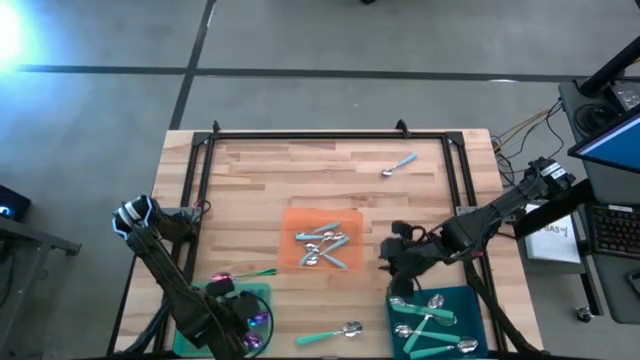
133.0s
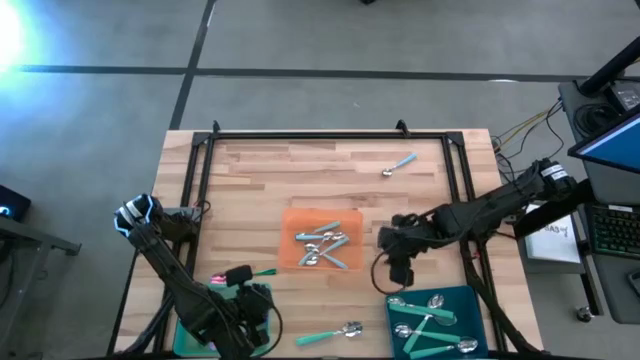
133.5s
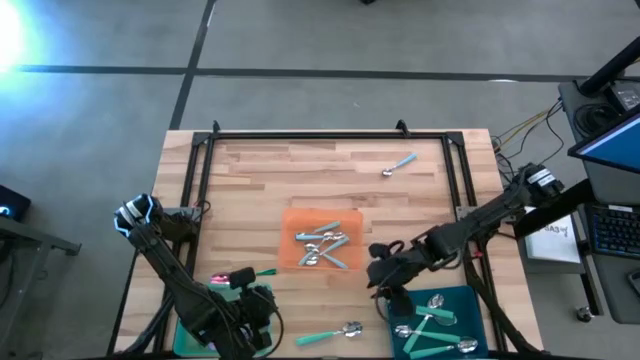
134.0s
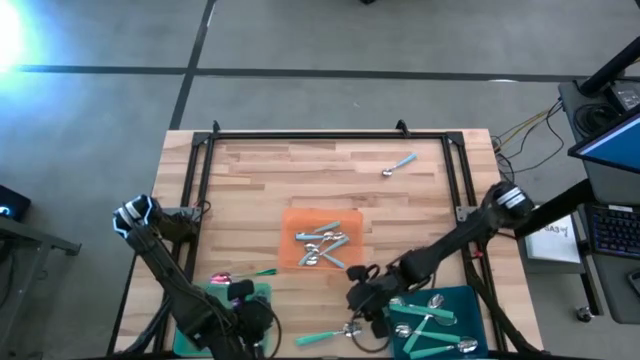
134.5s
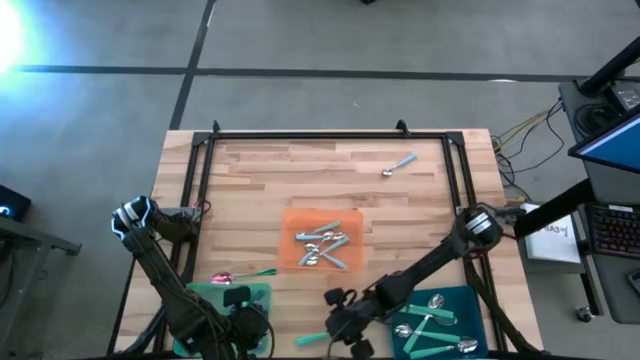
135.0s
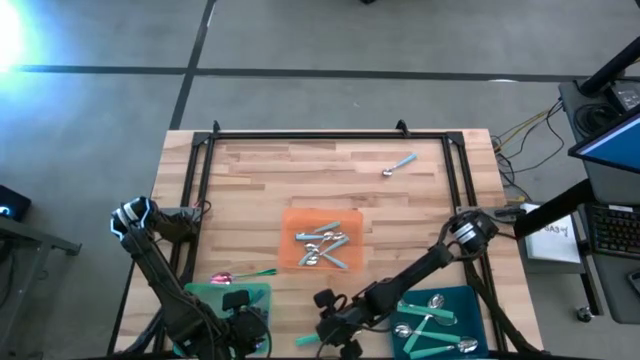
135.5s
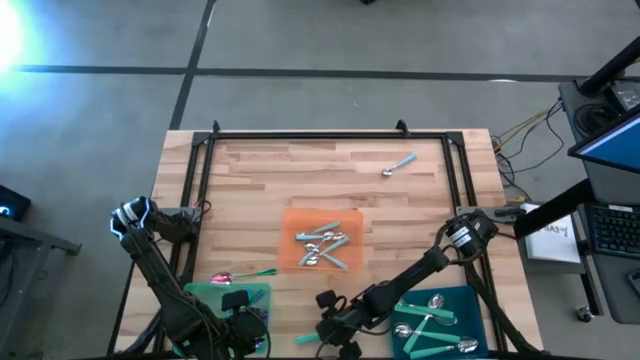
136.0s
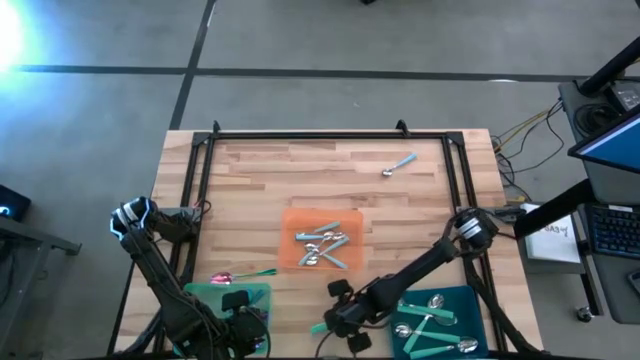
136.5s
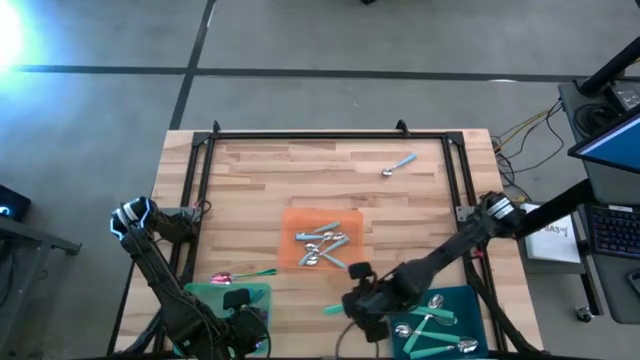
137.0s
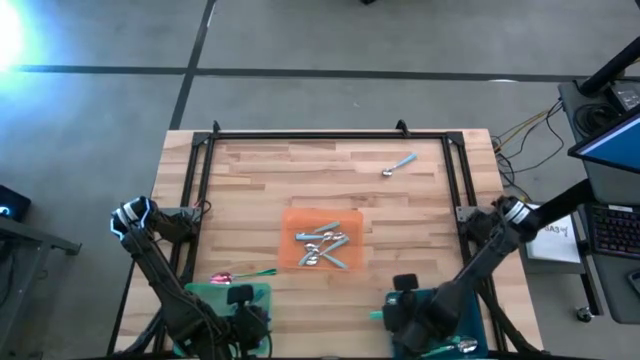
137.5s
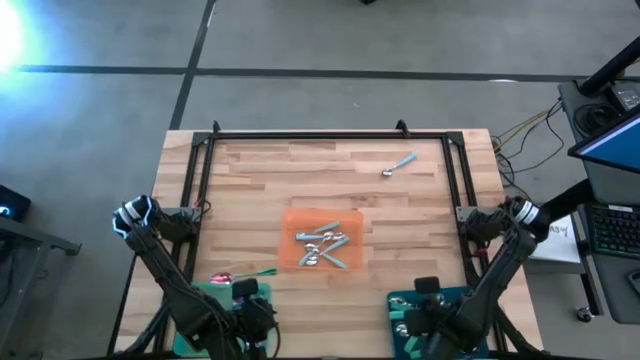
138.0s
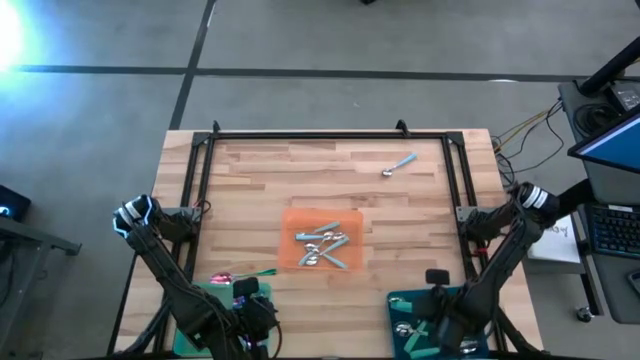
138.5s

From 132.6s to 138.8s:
Task: Sort silverware by color (type)
Put the green spoon into the blue bin

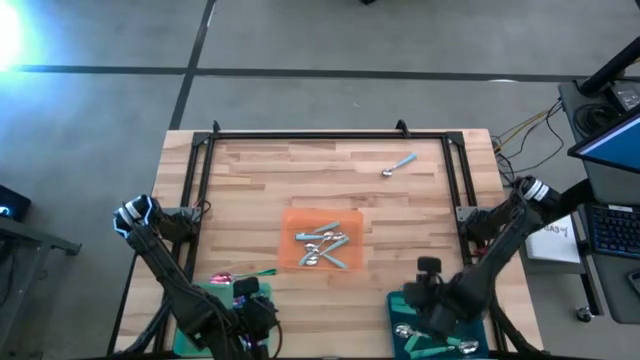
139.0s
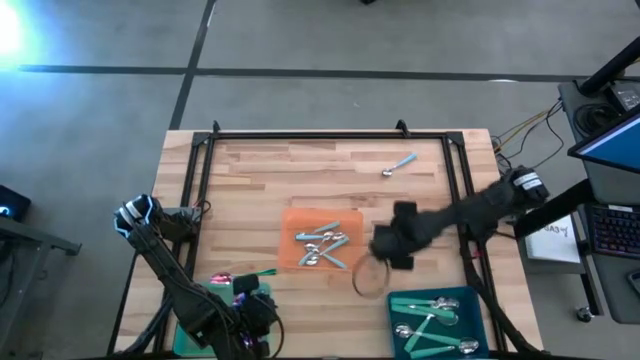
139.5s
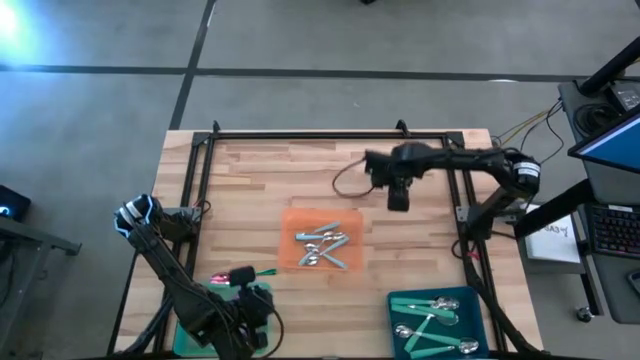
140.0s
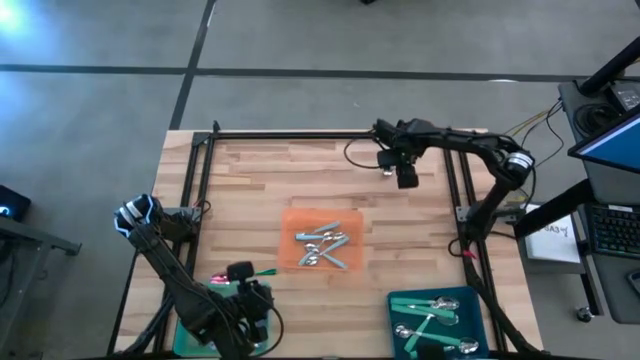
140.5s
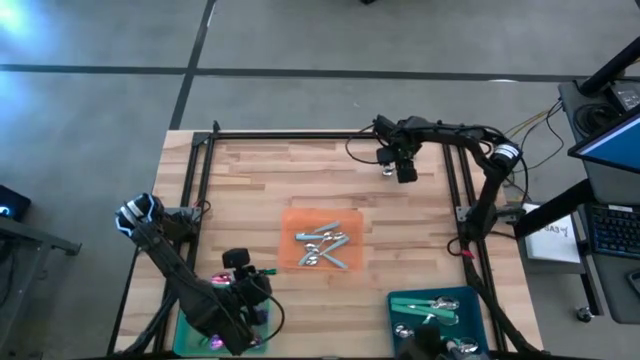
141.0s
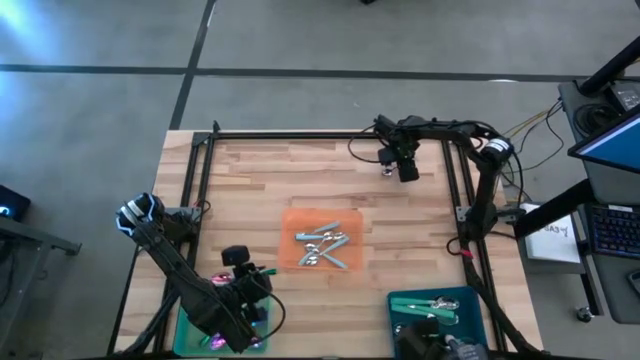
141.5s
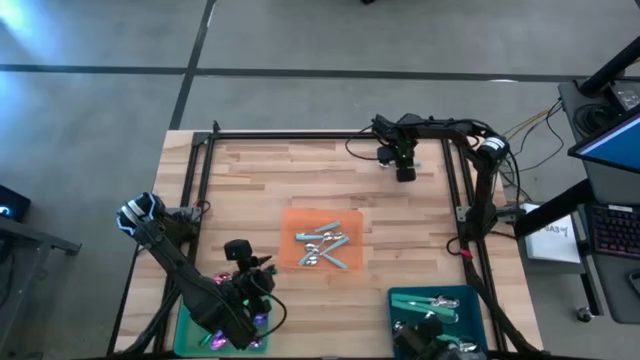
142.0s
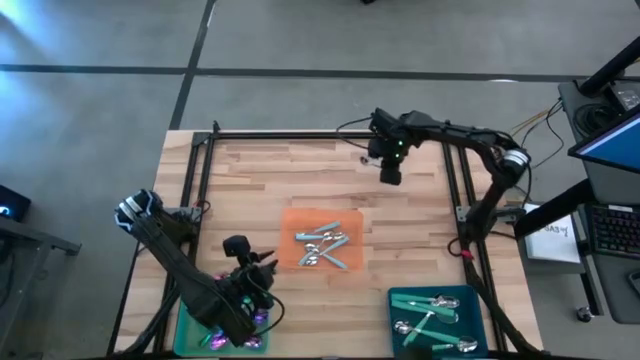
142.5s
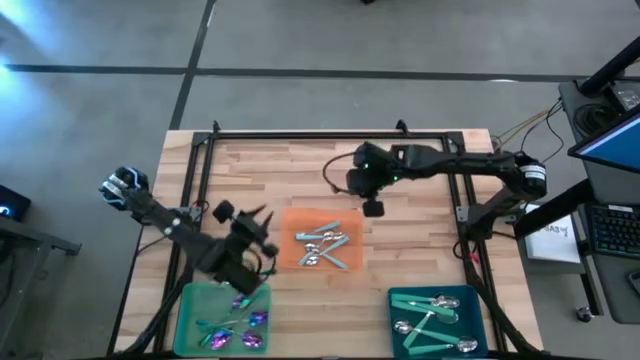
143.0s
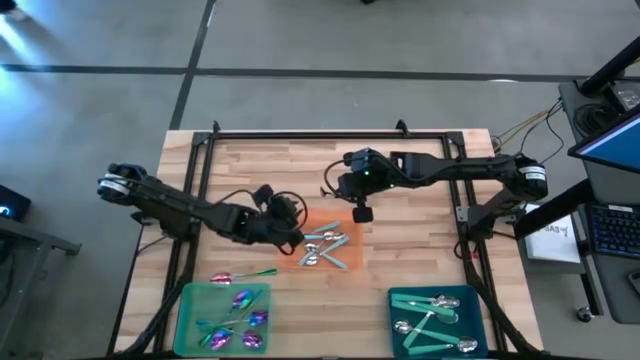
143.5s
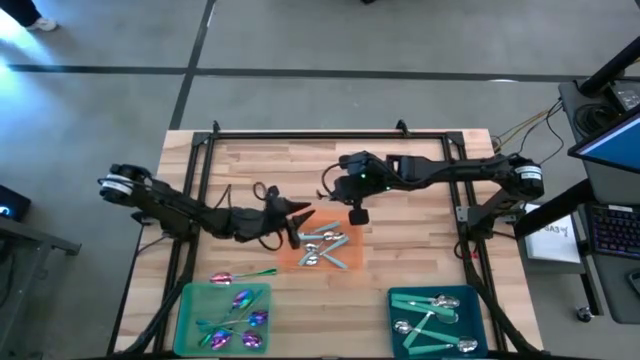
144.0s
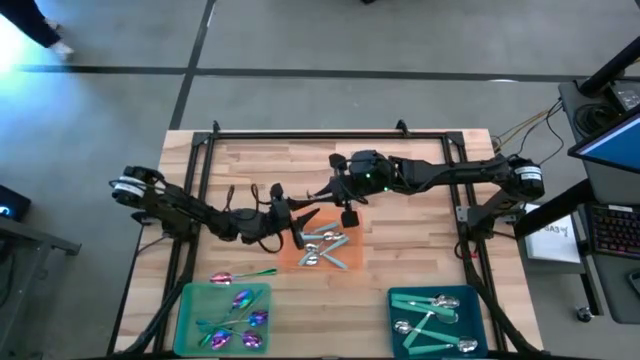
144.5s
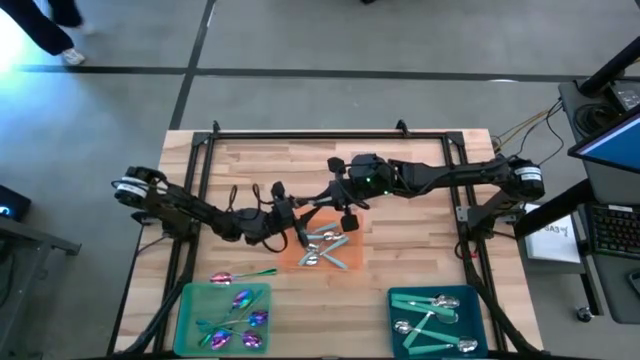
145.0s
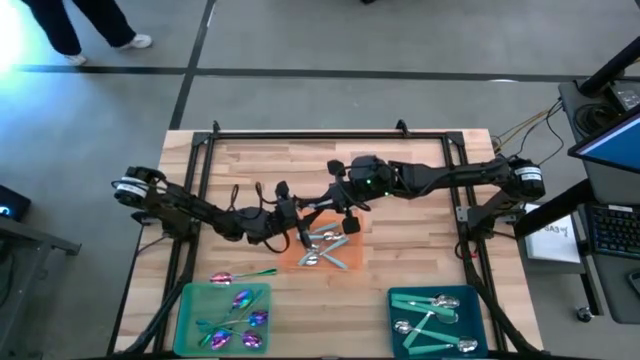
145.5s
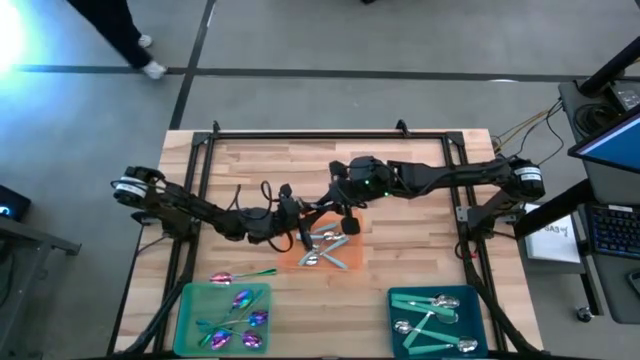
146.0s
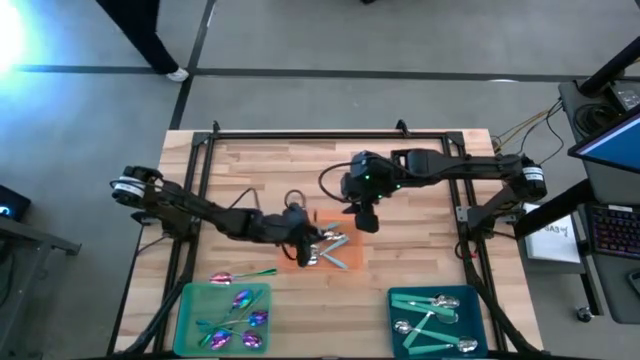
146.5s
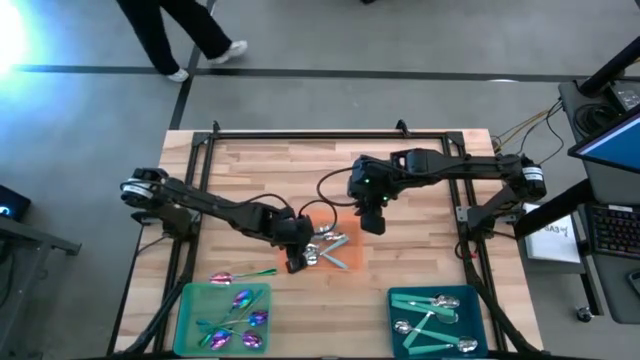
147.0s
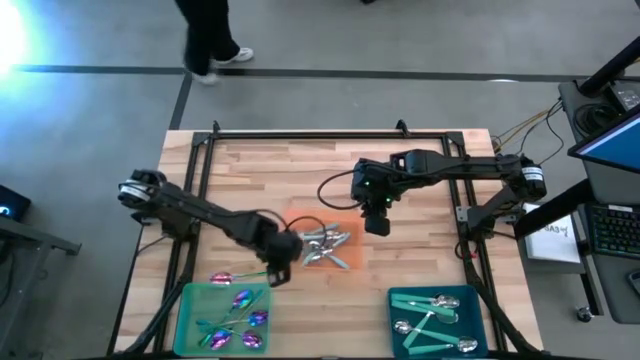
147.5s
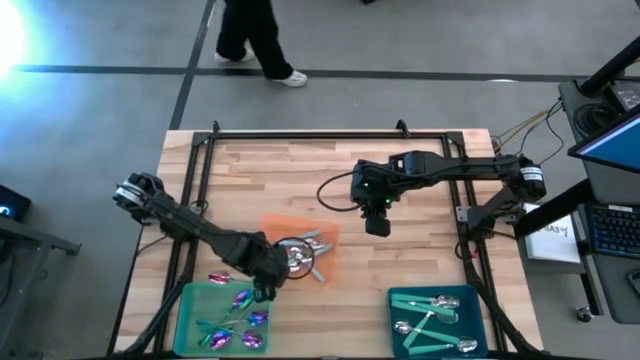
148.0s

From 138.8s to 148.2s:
Put the blue spoon into the orange bin

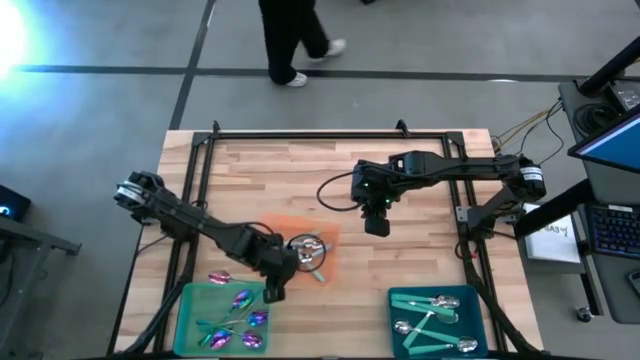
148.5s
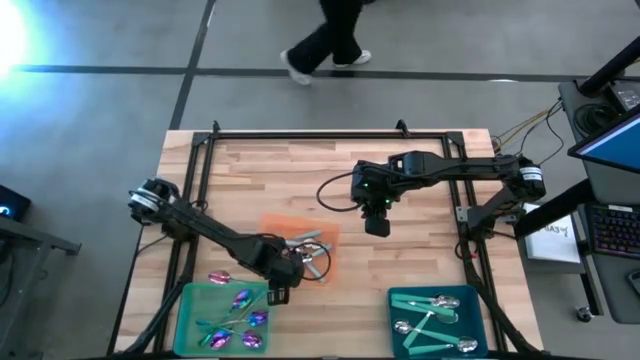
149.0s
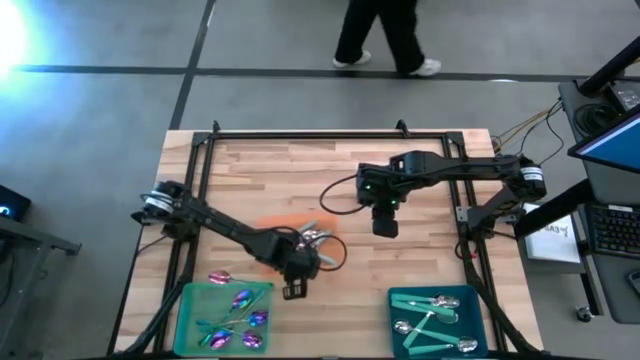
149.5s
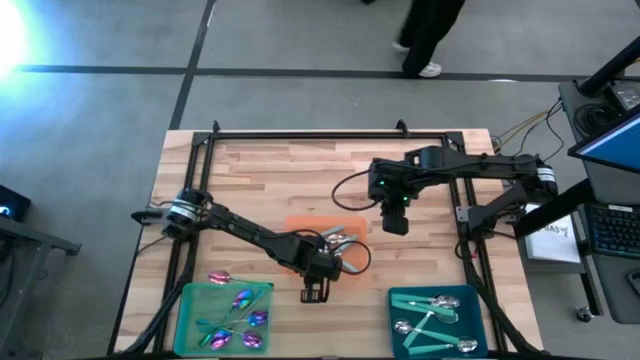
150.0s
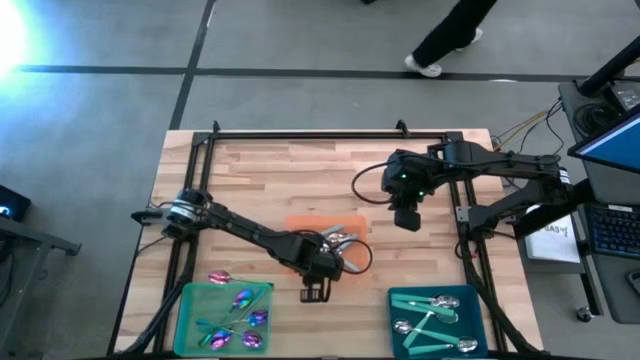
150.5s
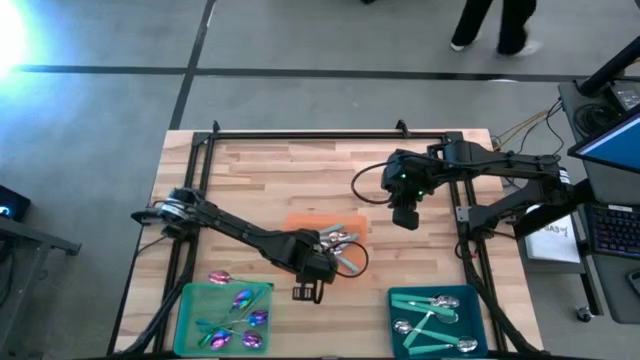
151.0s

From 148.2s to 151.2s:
Move the orange bin to the center

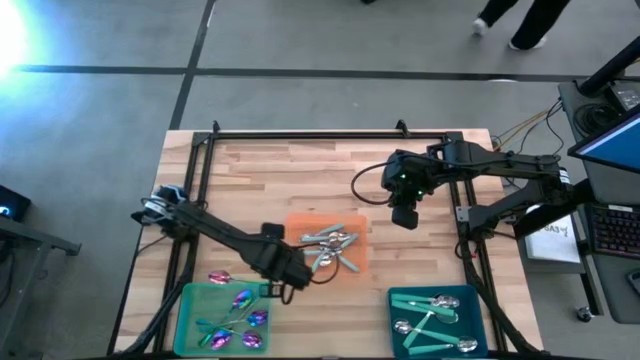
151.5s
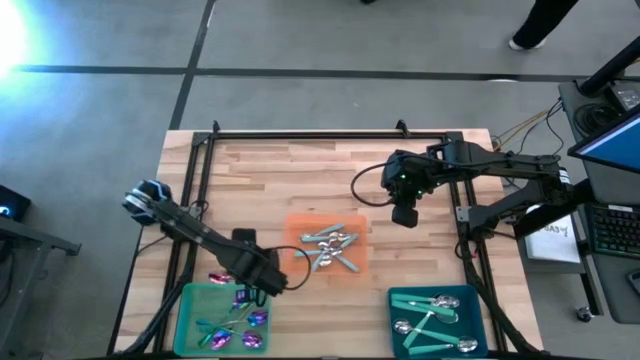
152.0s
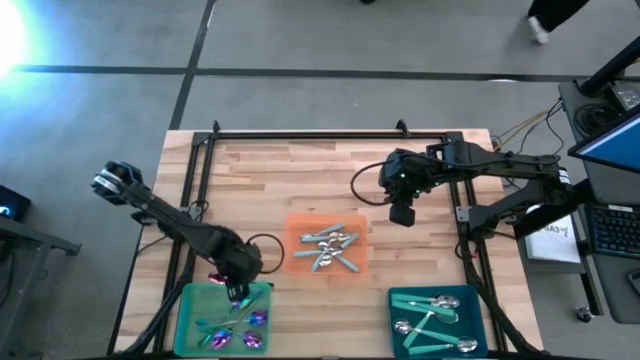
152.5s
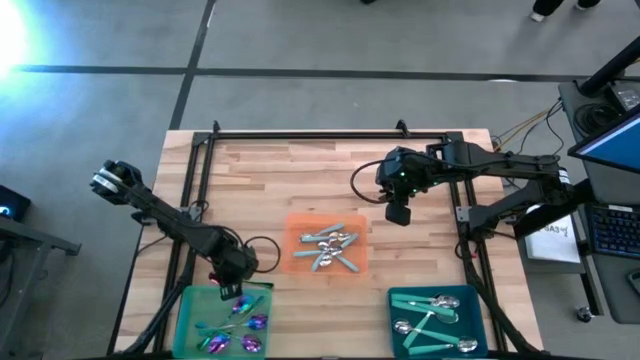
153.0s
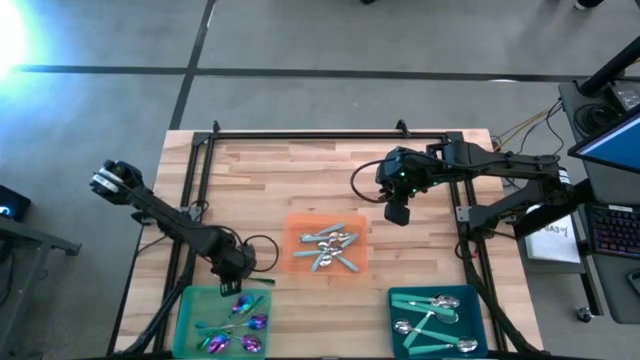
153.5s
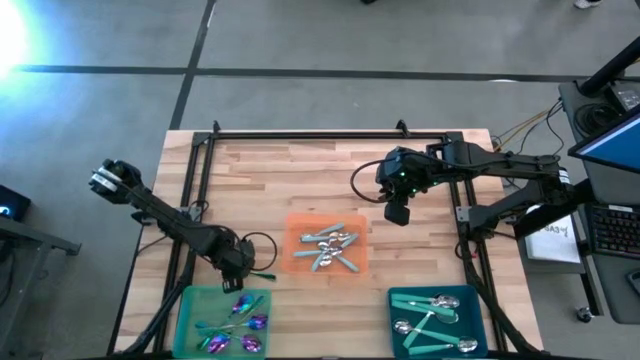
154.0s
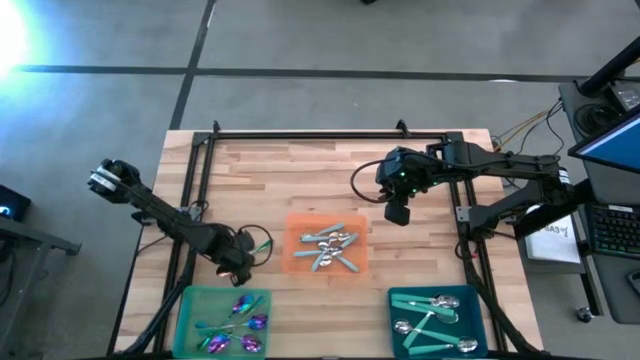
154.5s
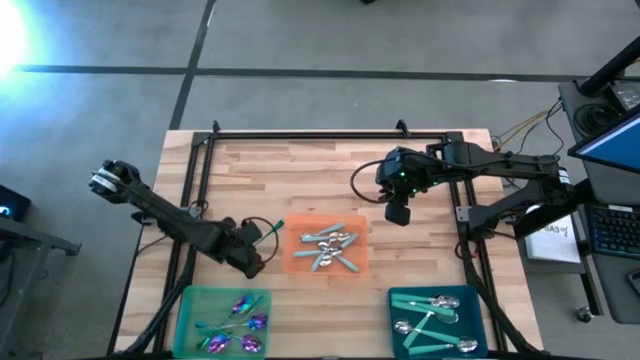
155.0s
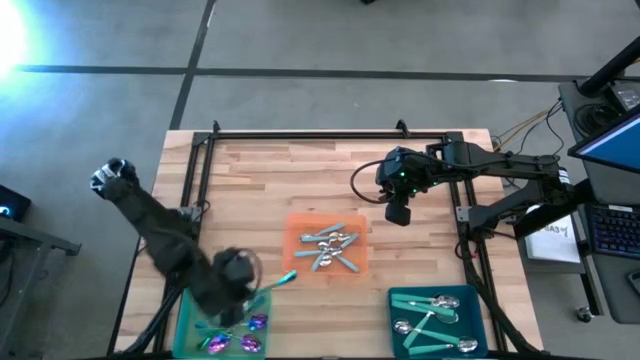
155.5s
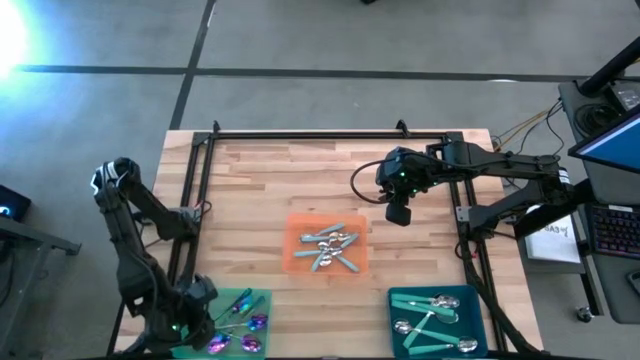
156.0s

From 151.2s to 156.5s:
Put the violet spoon into the green bin
